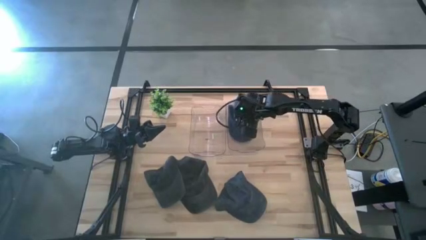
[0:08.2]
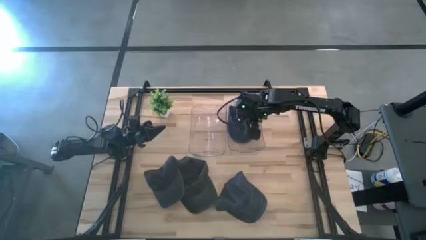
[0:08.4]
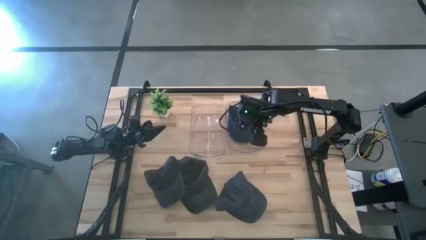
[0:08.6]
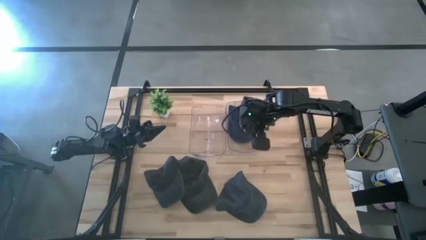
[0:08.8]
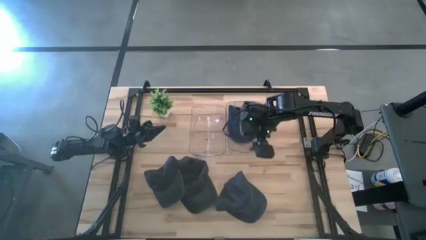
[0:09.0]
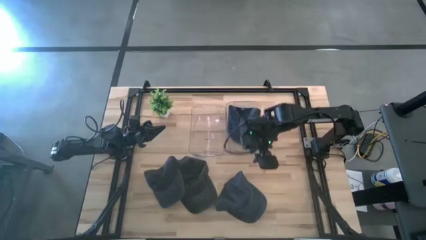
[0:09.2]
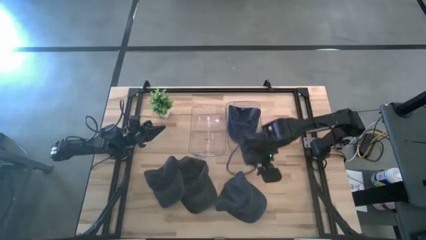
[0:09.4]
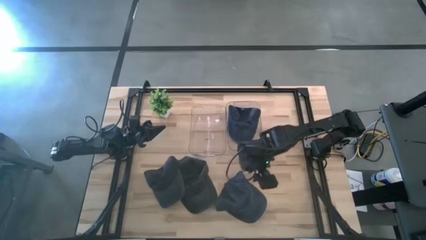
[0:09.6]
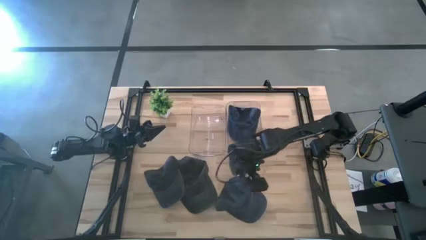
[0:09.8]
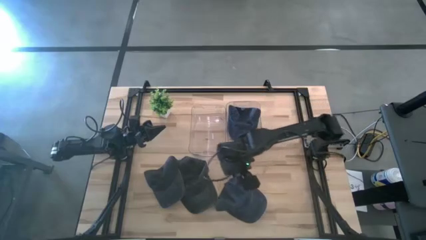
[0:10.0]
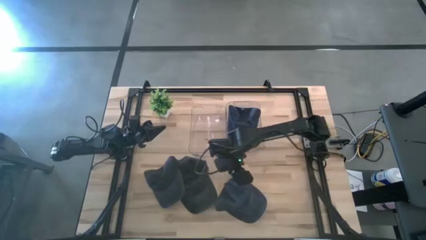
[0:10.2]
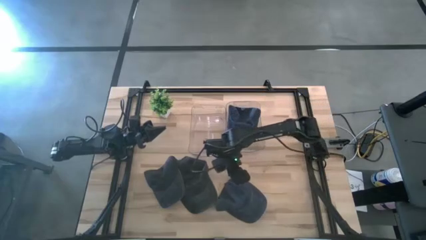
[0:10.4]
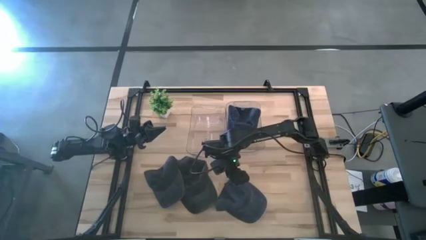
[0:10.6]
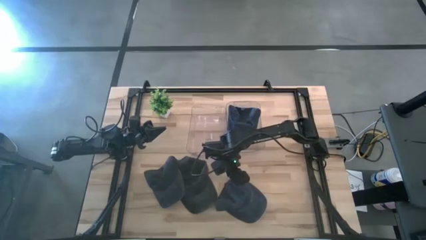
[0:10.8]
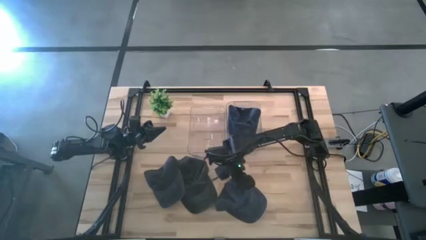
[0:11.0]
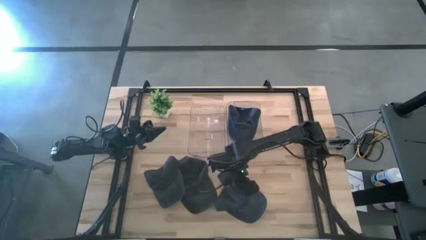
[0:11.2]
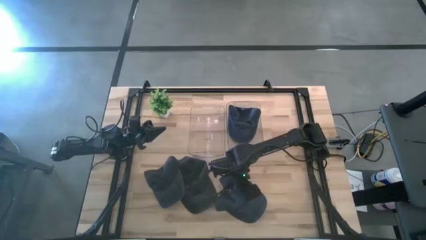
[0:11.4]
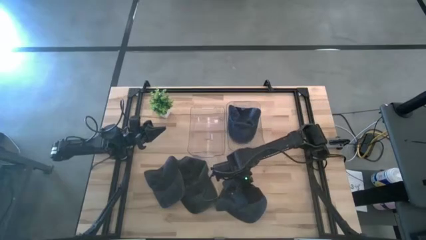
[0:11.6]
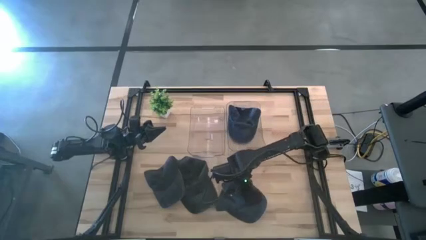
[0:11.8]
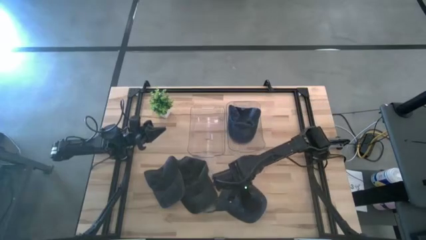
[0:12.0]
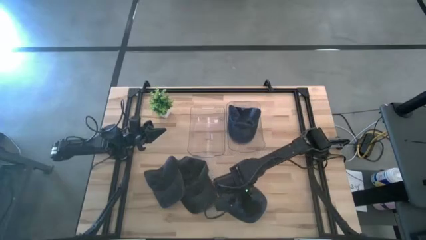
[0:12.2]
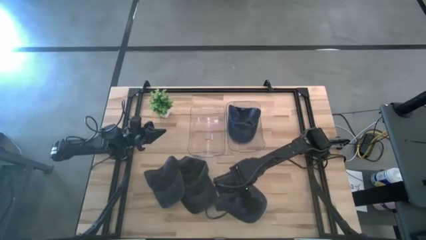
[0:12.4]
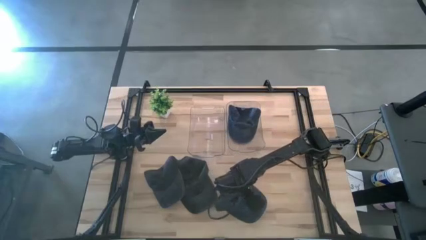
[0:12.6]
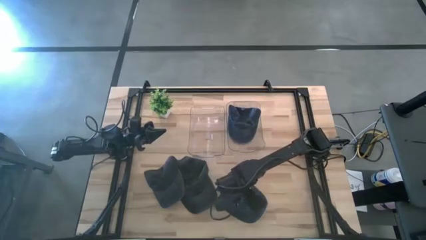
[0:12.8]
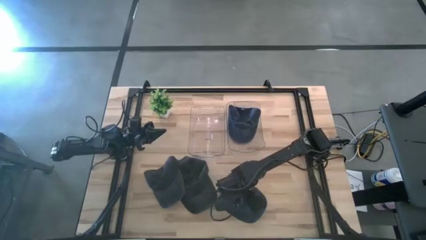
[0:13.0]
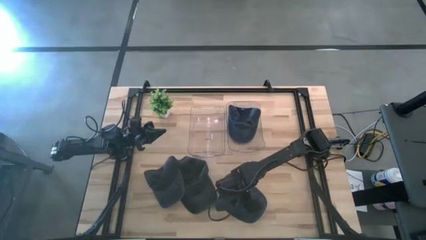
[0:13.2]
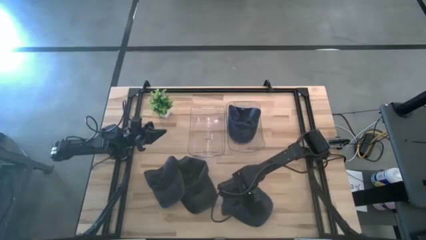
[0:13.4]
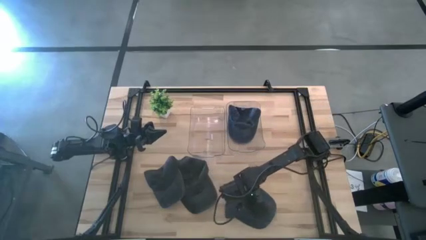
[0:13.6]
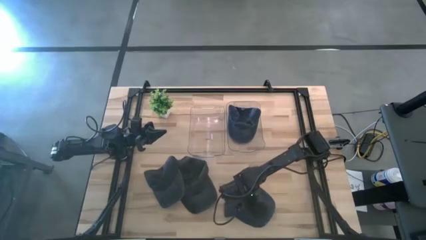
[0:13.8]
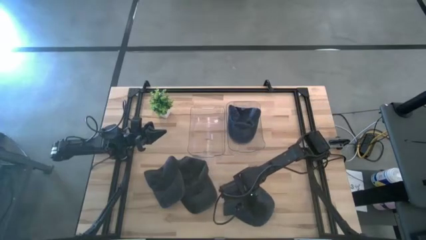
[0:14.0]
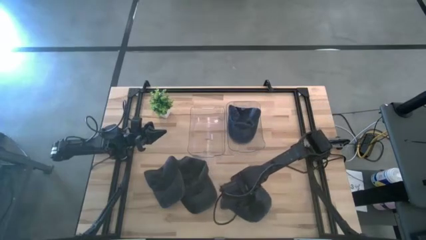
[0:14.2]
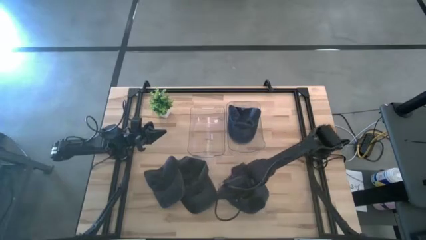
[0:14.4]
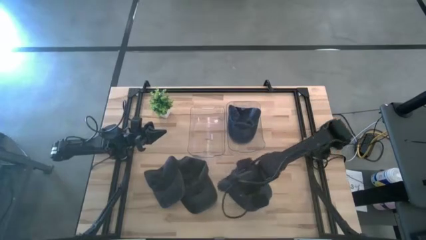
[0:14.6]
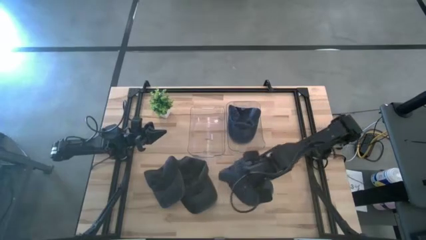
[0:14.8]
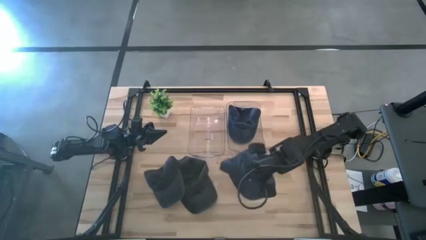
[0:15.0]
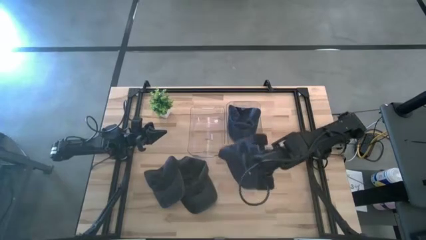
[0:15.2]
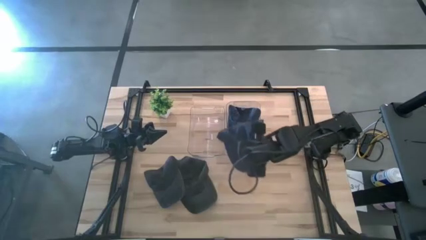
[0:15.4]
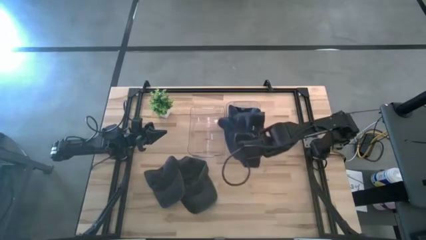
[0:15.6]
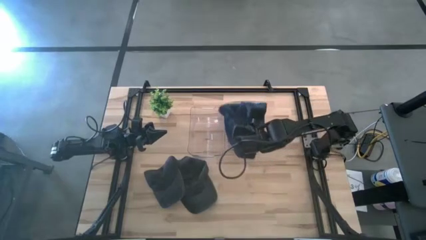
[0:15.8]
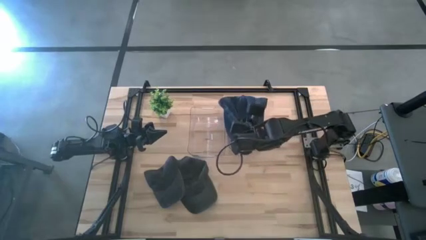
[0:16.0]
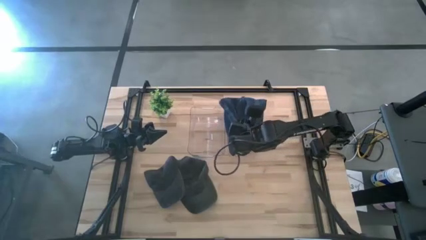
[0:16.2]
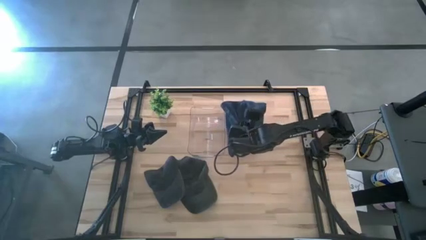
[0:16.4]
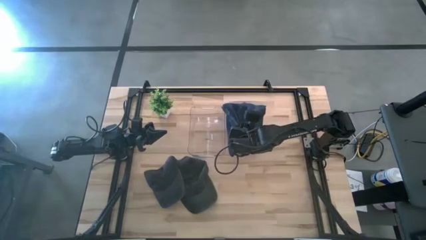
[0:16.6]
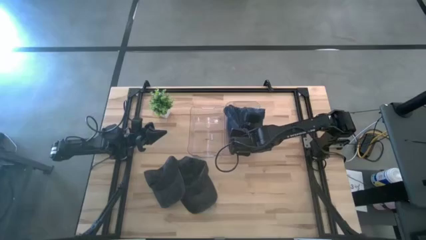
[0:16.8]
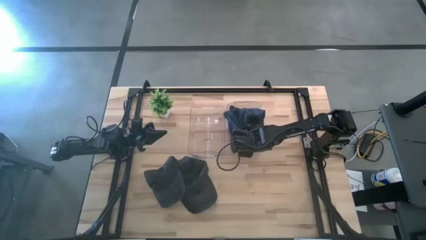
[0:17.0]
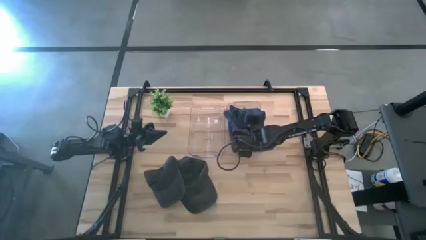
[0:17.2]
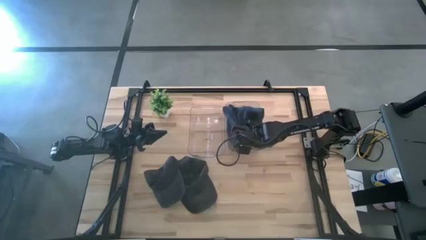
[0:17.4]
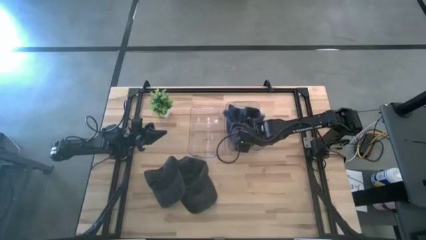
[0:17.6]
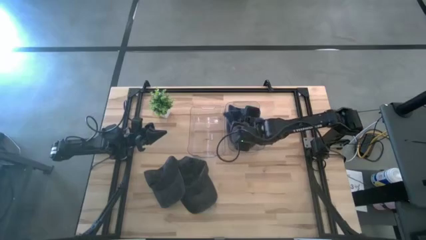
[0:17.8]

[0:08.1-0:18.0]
Task: Pick & Place hat
Put the blue cap into the right transparent bin

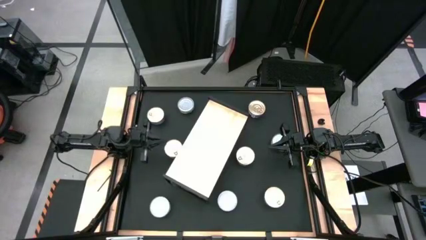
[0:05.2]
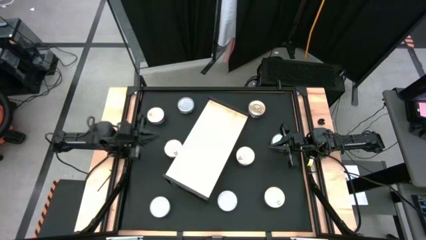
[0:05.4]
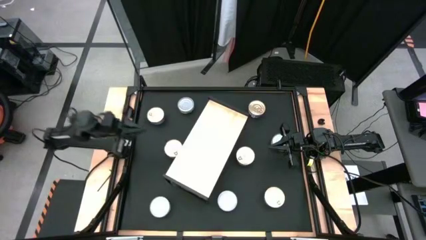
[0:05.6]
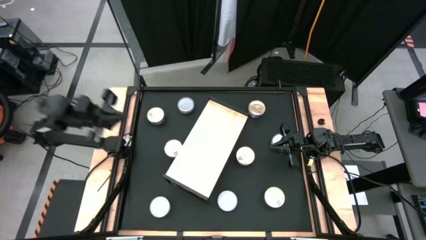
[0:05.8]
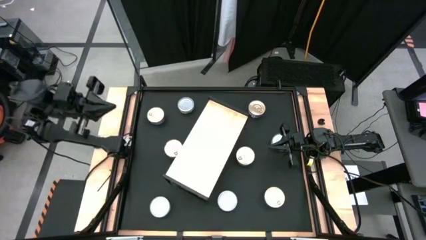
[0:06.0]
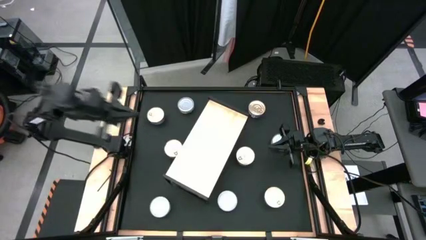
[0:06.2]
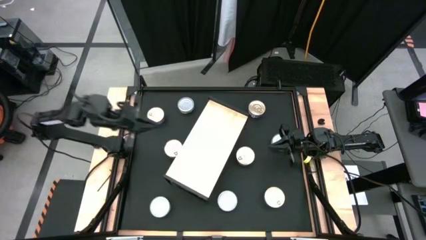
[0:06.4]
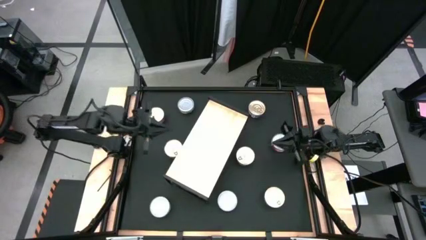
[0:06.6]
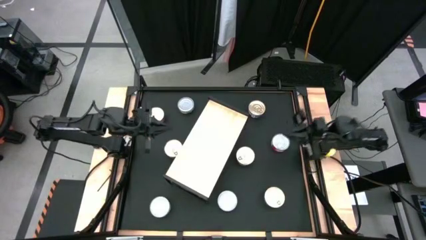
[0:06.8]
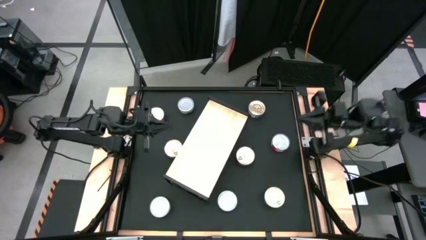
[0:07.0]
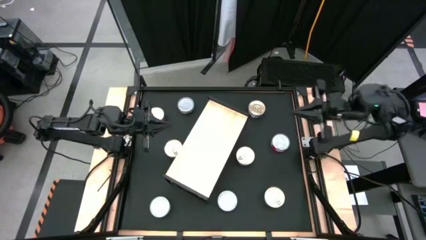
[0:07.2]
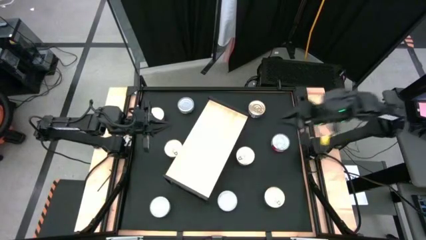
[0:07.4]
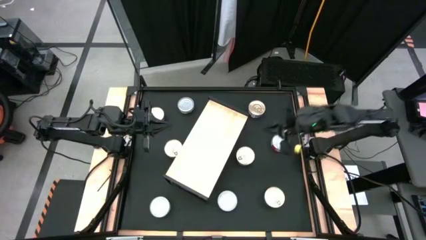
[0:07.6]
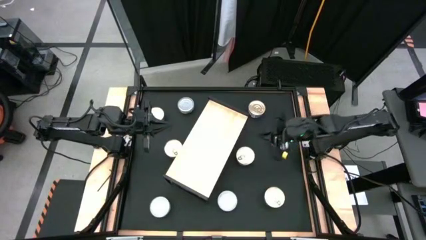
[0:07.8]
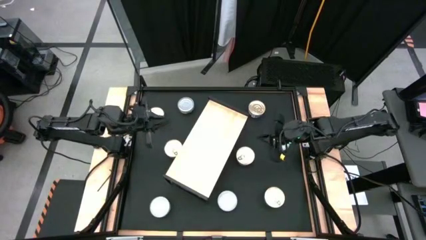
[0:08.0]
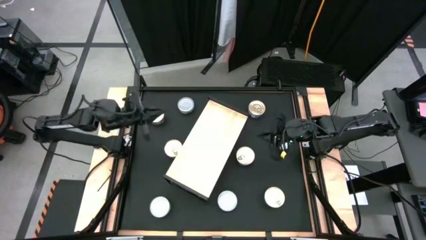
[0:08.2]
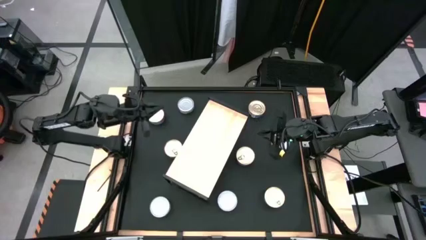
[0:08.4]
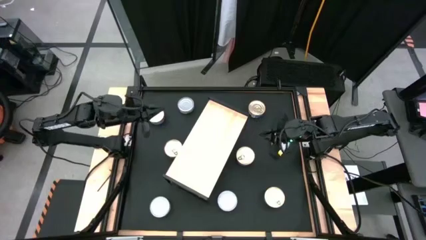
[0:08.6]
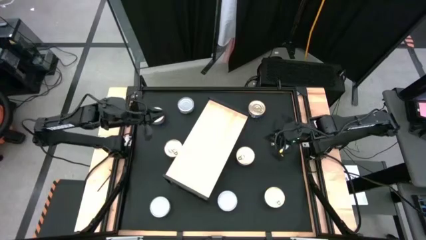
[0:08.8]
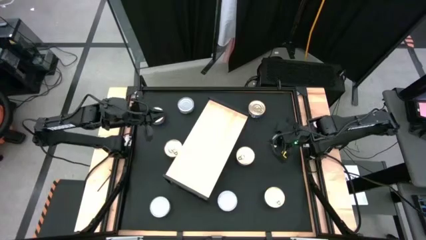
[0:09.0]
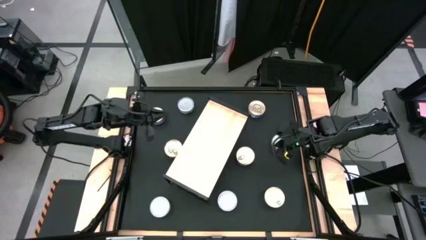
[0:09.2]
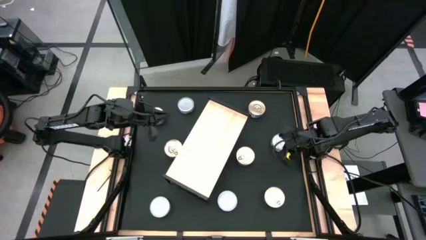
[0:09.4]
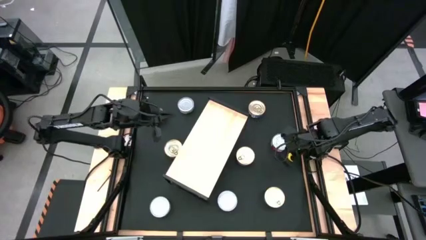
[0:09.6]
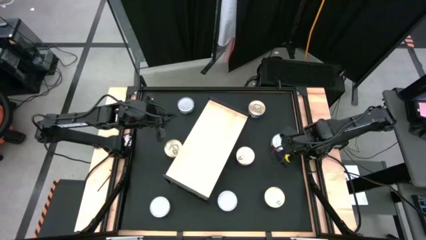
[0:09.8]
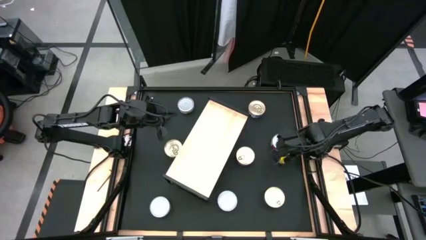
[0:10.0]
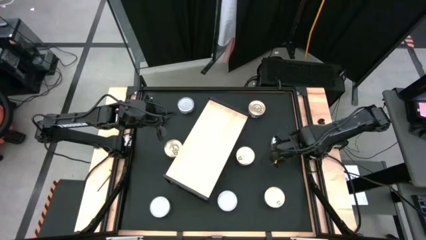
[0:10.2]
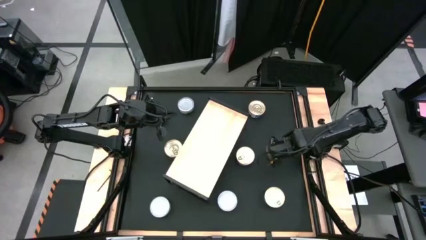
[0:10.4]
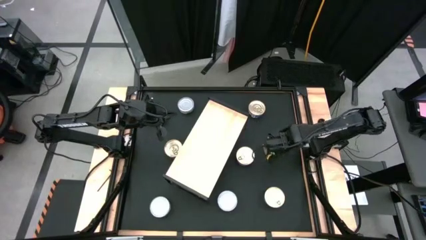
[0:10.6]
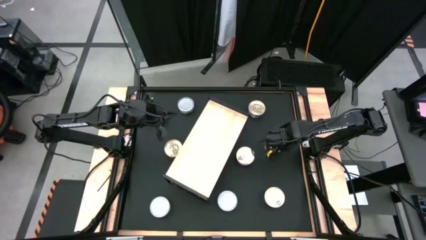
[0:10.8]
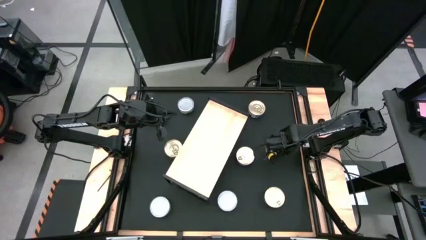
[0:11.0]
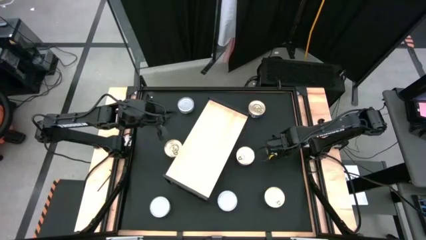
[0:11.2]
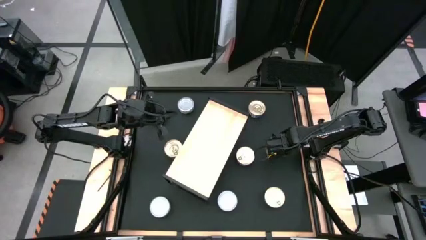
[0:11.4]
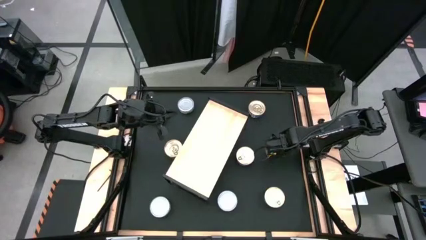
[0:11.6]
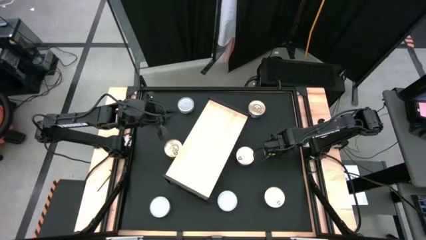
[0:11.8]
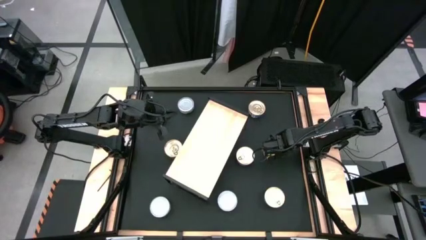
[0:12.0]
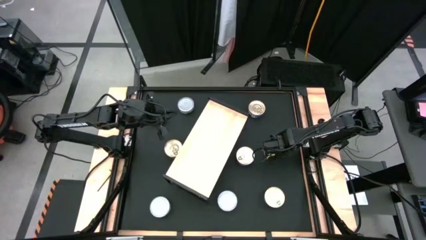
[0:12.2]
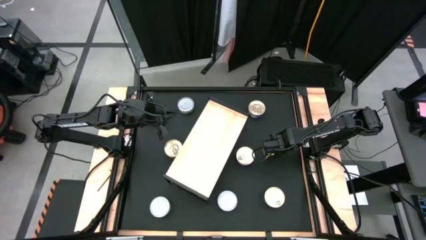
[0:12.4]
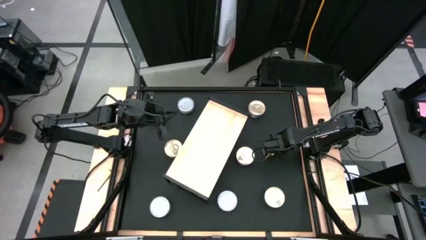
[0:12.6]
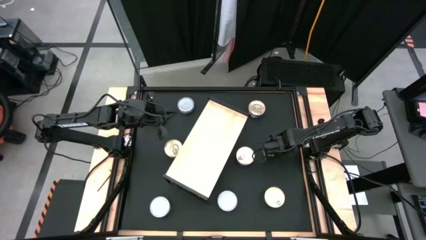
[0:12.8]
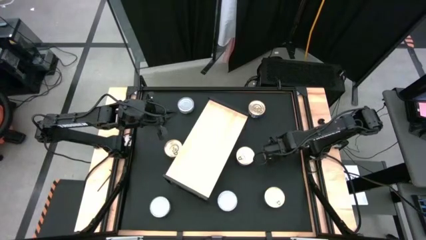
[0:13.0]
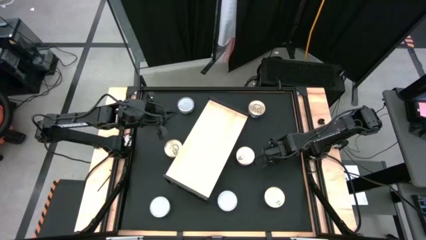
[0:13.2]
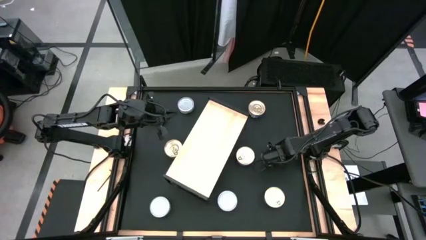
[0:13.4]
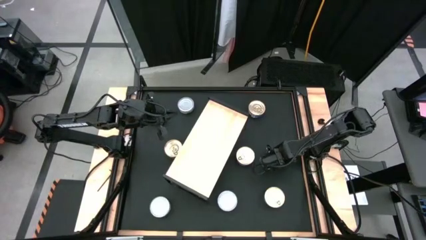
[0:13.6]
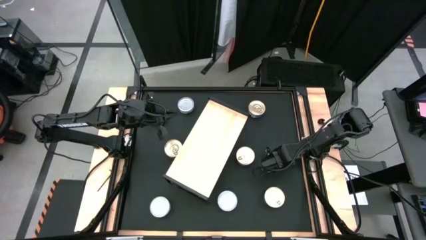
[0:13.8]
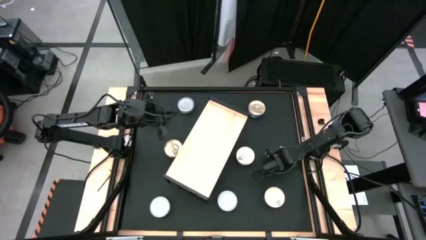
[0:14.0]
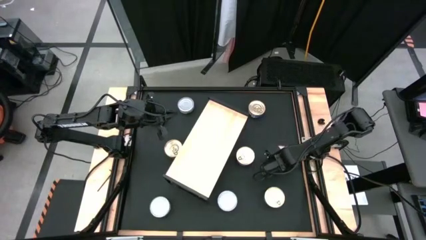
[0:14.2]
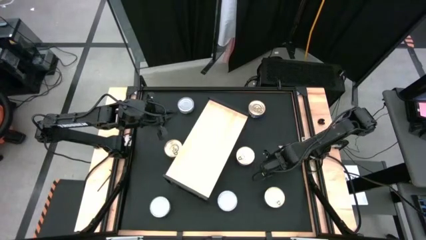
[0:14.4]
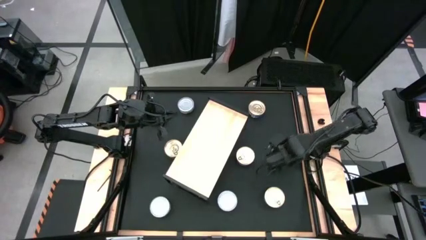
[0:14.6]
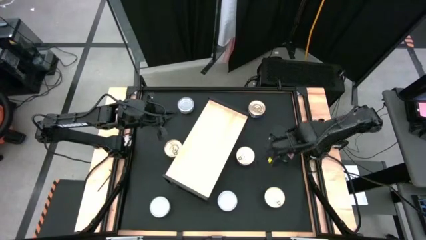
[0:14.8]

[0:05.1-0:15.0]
Task: Stack canned seafood by type on shelf
Put the red tuna can on the shelf
